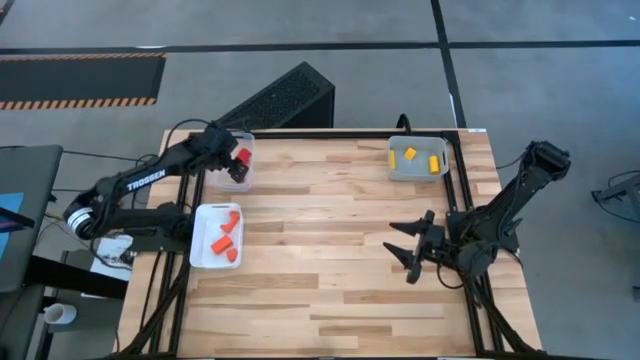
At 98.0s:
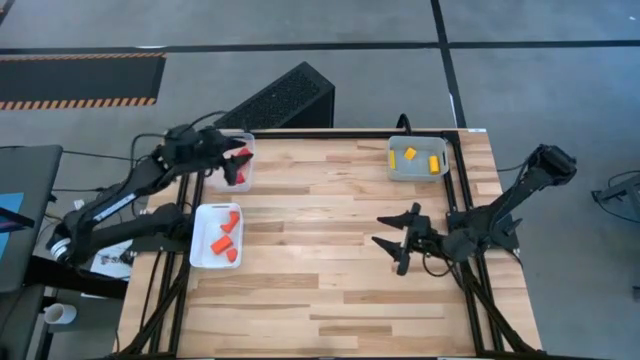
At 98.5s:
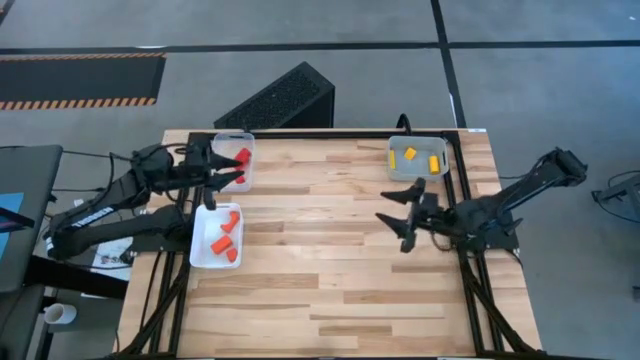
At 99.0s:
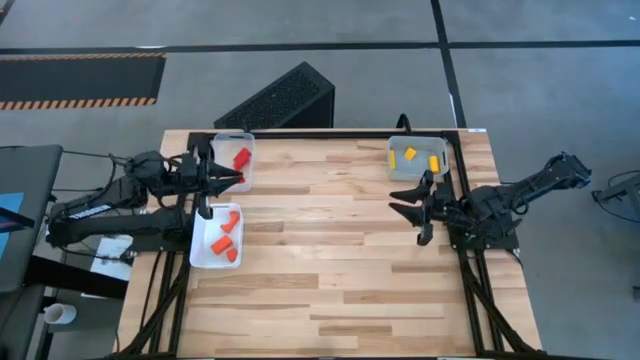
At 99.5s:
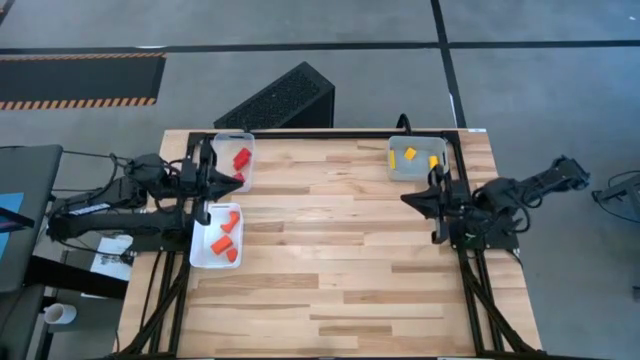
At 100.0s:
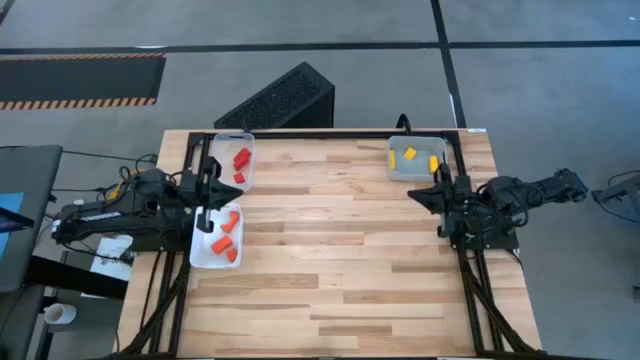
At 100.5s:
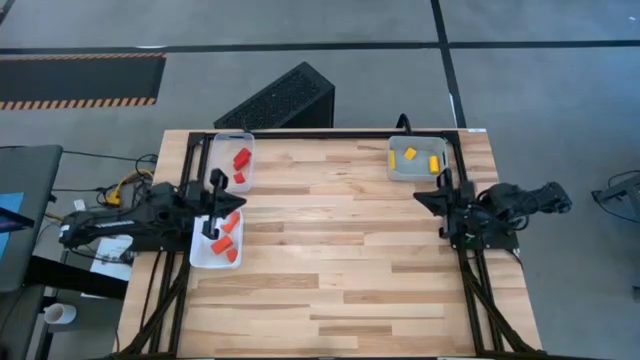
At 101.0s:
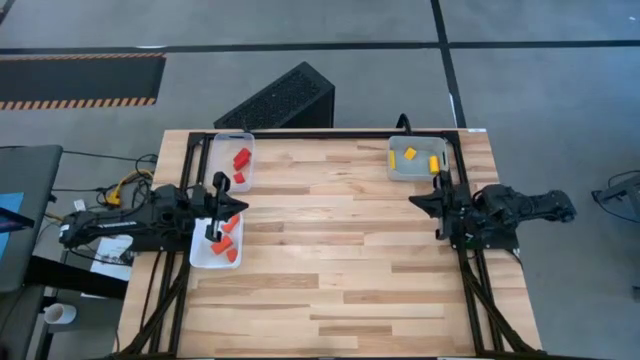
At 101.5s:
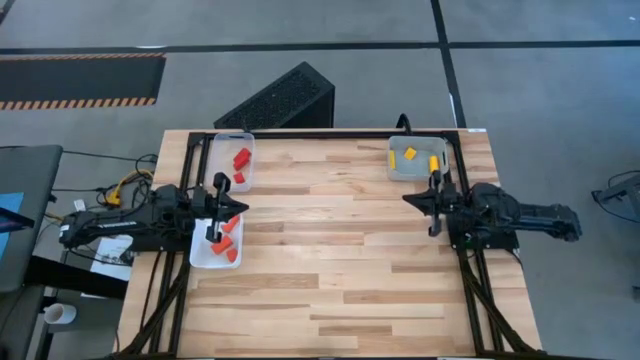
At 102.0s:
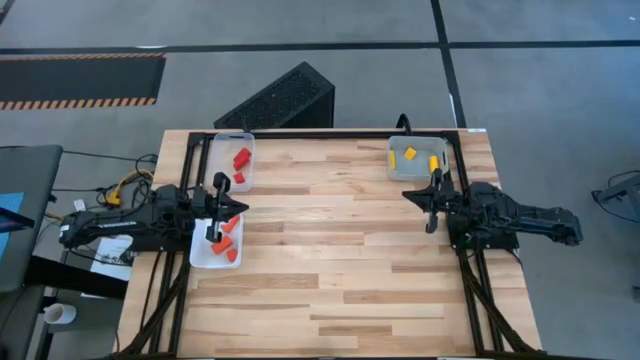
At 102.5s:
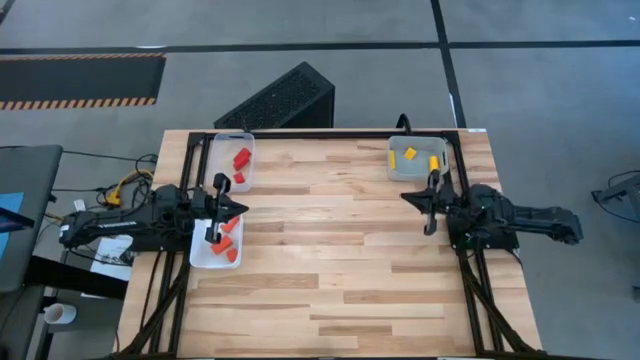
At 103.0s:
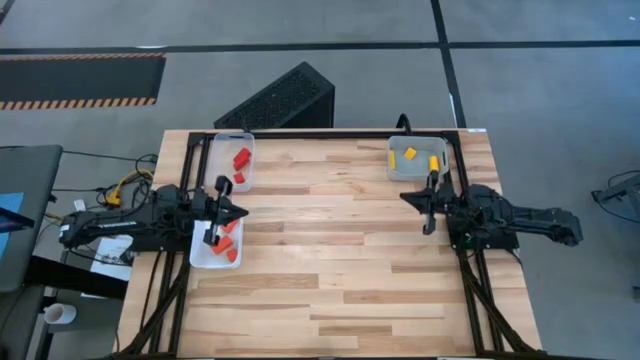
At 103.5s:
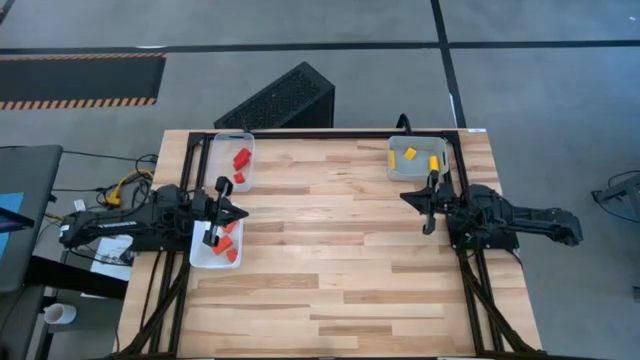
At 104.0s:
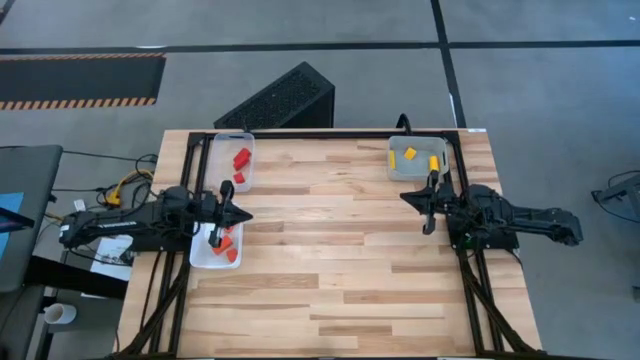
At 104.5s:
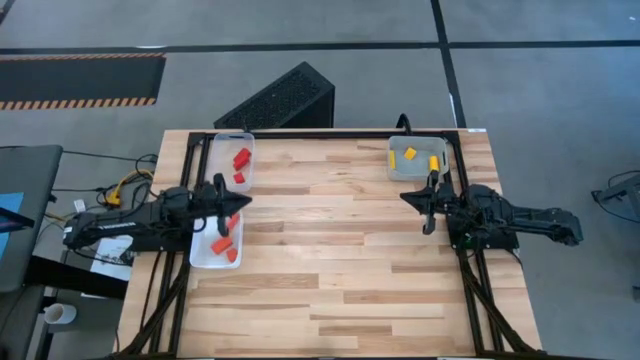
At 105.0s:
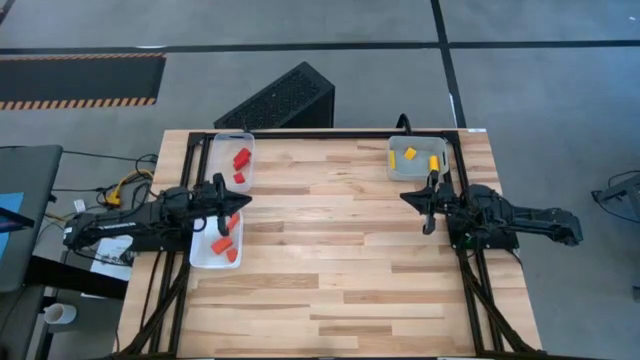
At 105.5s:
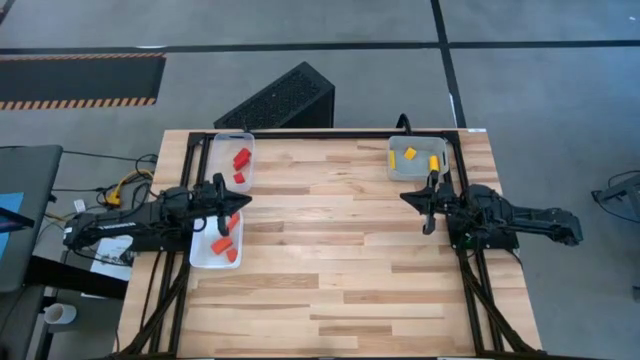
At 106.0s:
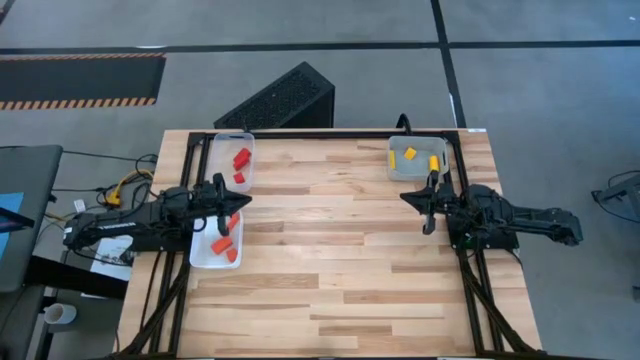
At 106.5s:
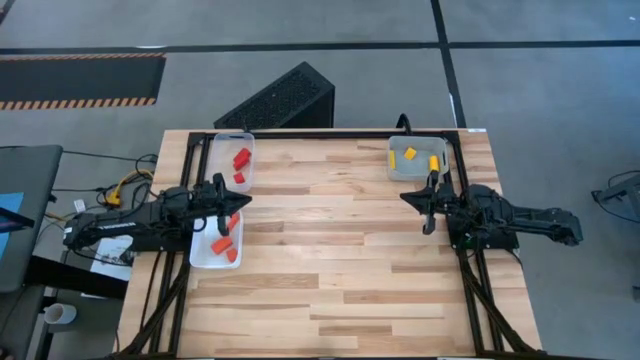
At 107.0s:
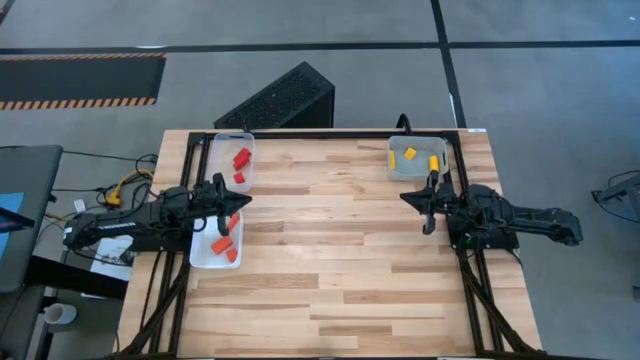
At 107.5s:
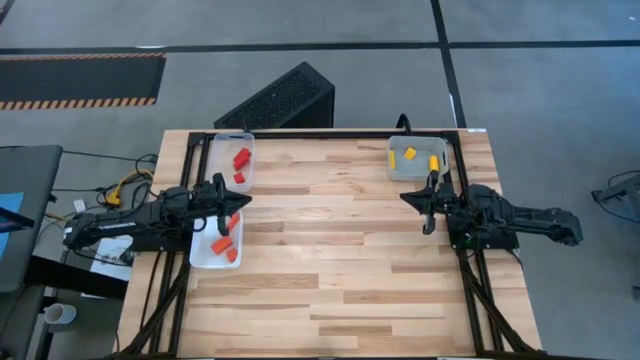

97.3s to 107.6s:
Task: Sort & place blocks by color
Return to Home Position

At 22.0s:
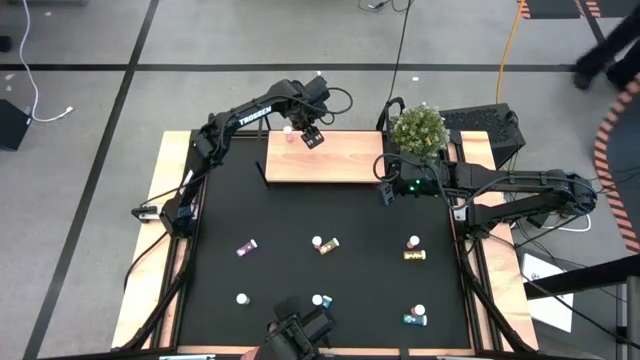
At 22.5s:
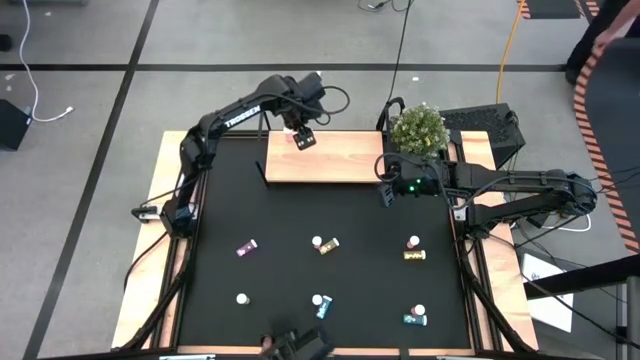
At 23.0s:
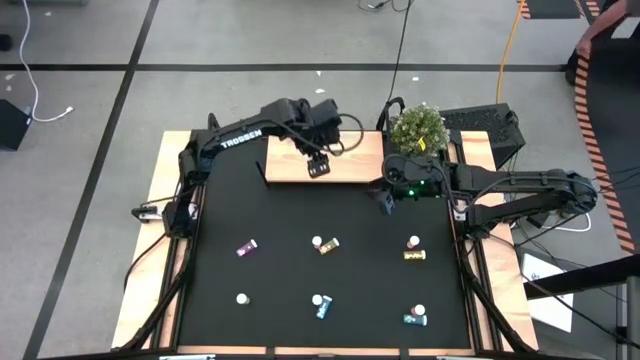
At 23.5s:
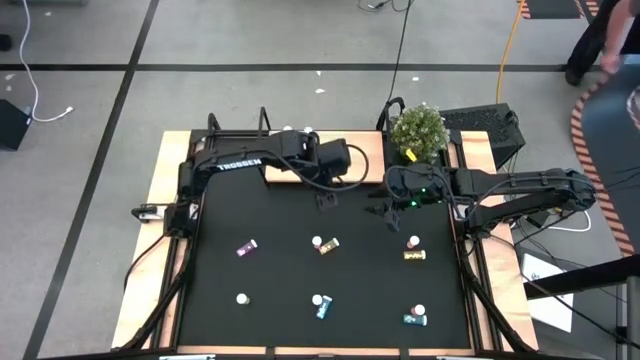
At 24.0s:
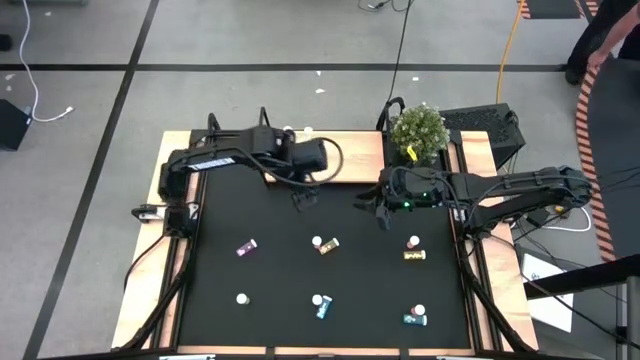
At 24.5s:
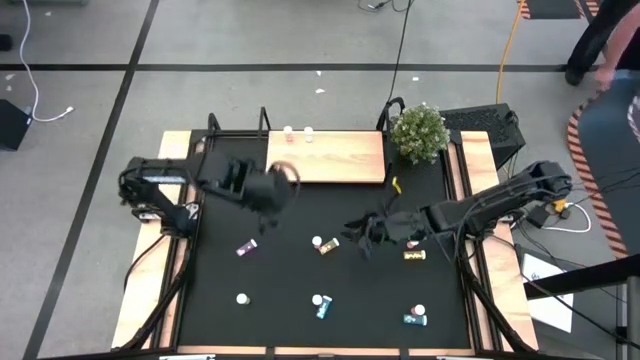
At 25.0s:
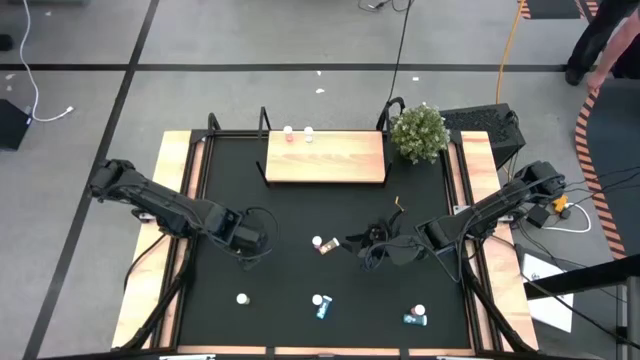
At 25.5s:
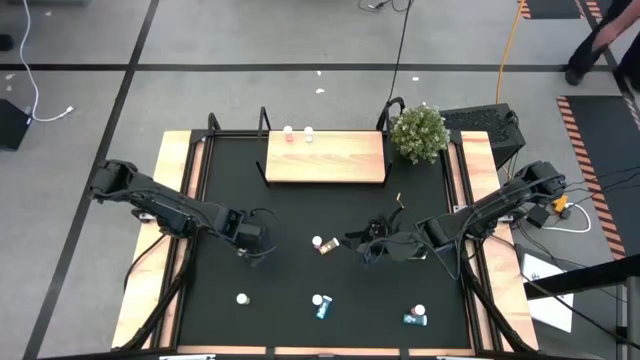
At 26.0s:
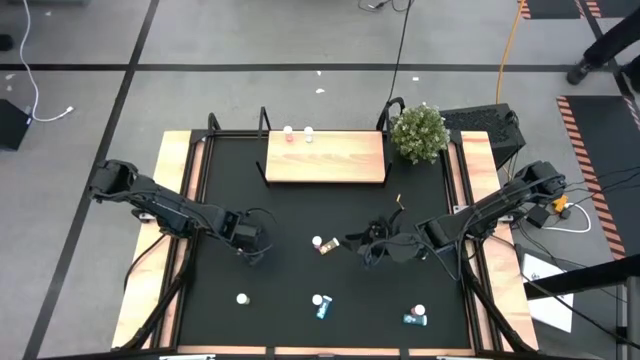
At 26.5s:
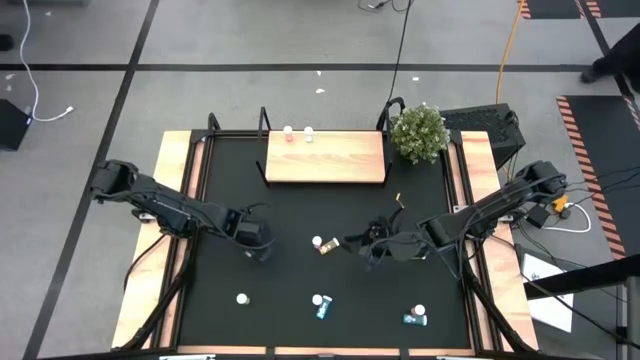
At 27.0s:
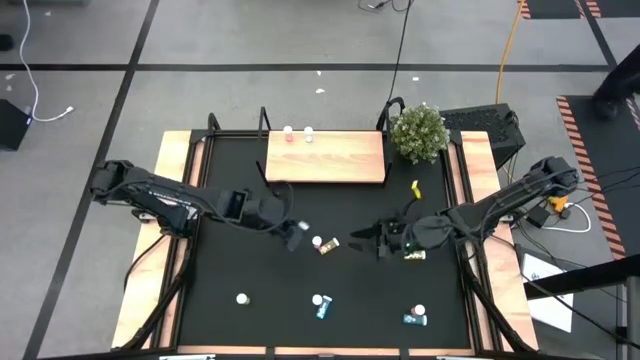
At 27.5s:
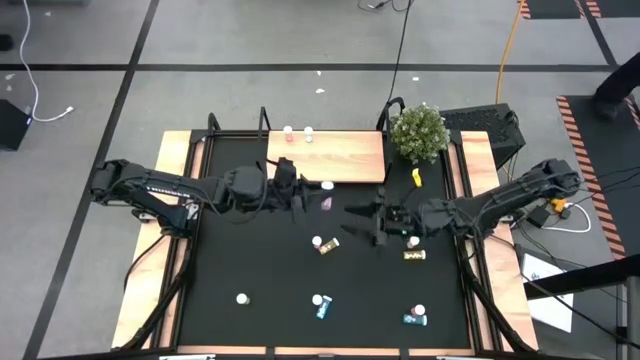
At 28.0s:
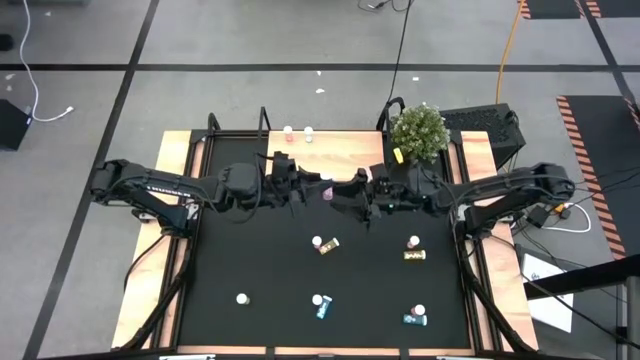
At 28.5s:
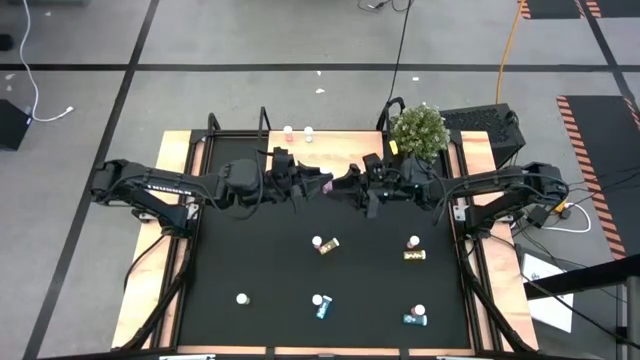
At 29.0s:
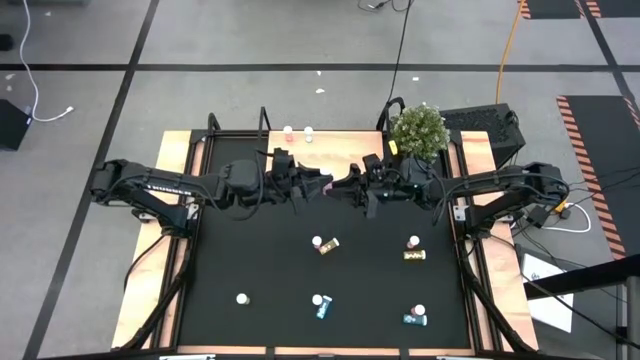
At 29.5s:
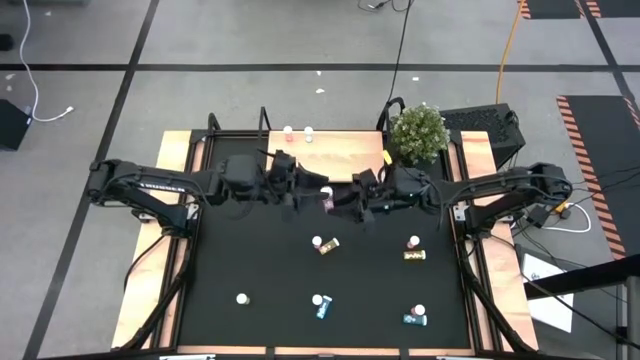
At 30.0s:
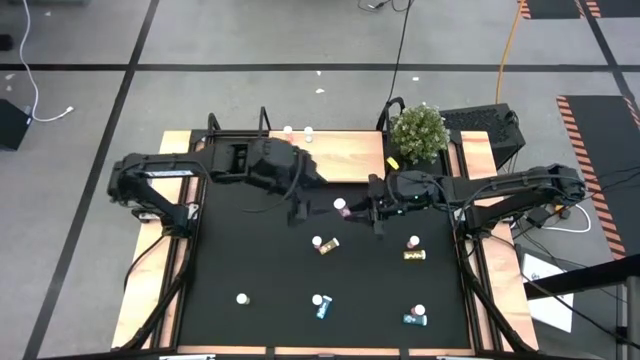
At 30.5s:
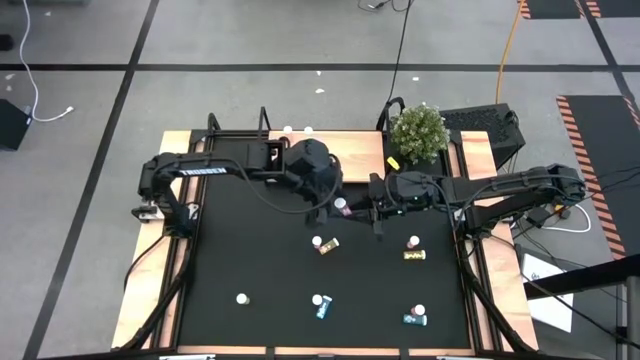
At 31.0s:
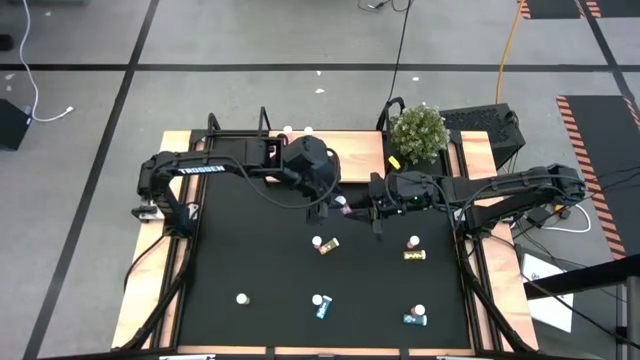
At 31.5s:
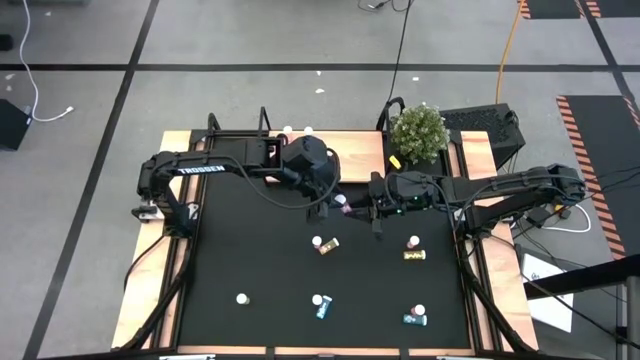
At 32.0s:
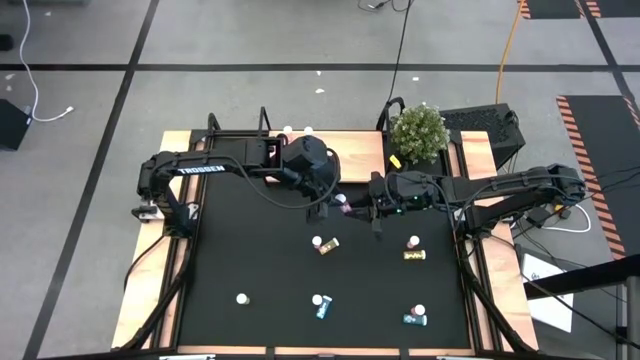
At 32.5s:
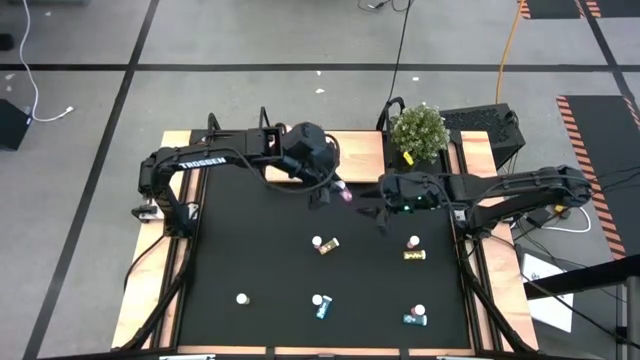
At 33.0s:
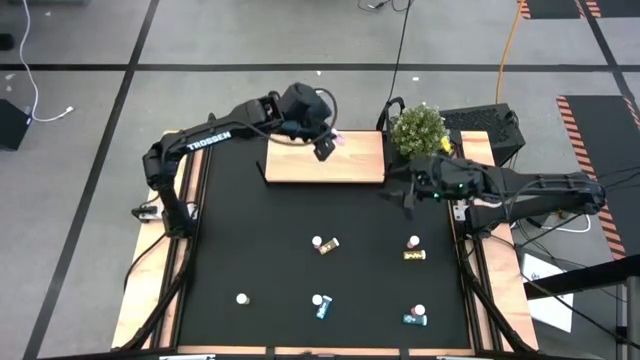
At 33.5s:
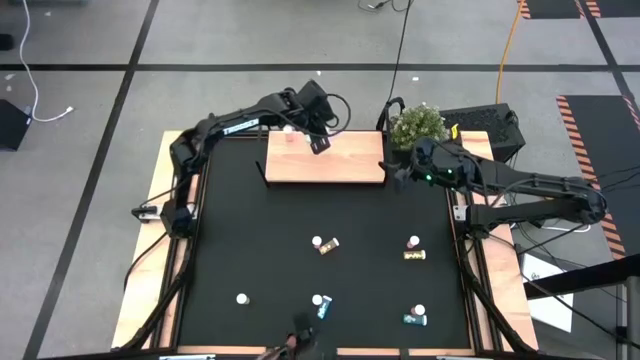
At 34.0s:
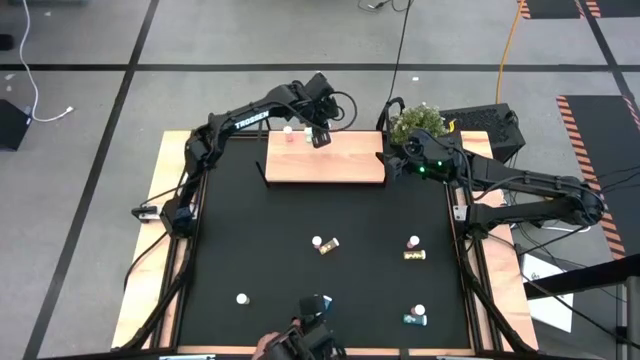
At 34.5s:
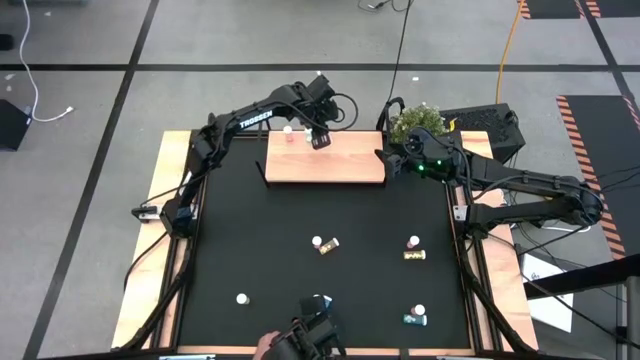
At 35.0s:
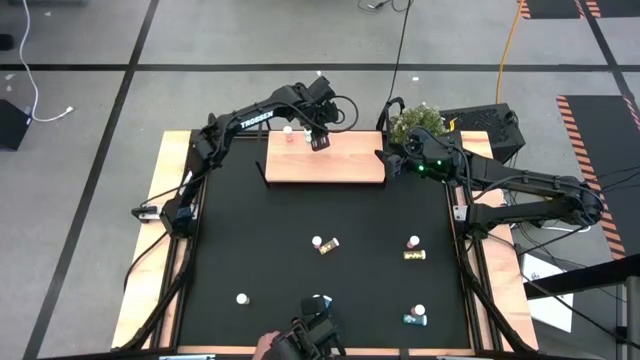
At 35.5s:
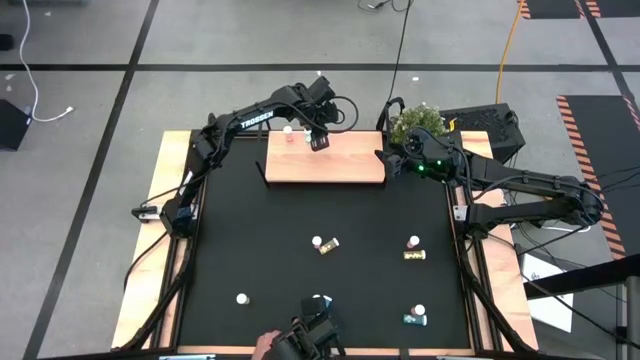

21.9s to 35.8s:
Task: Pick and place medicine bottles onto shelf by color
Put the top left pink pill bottle on the shelf
